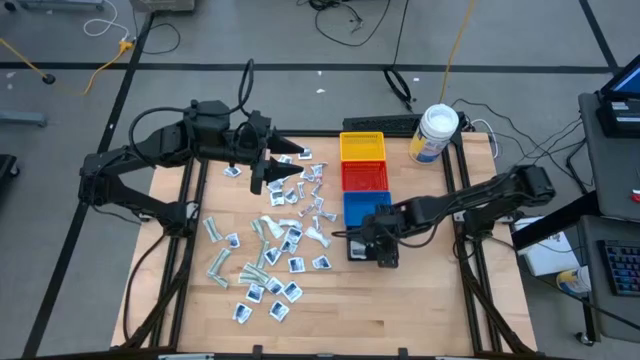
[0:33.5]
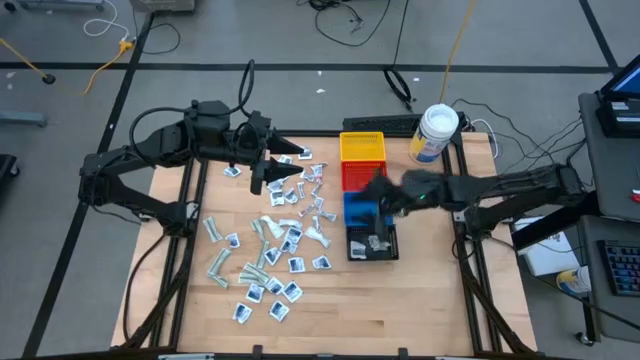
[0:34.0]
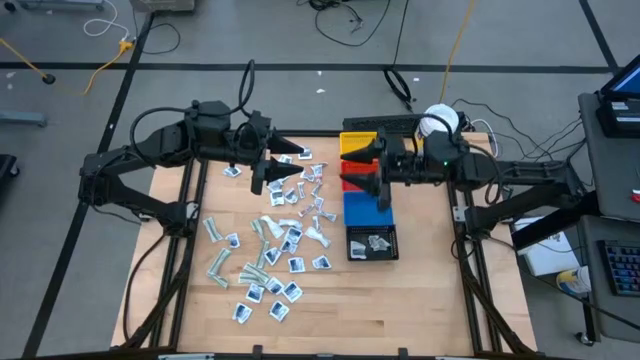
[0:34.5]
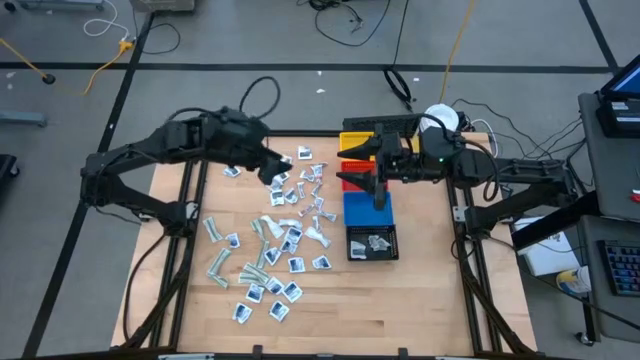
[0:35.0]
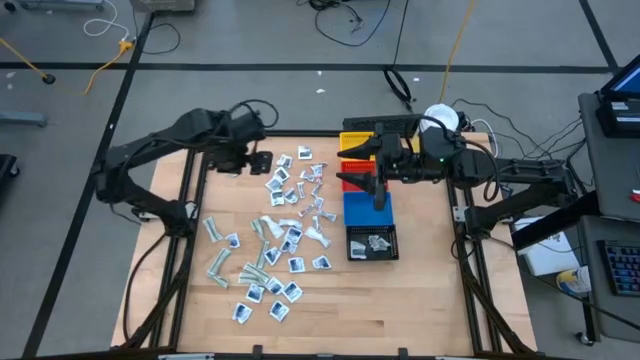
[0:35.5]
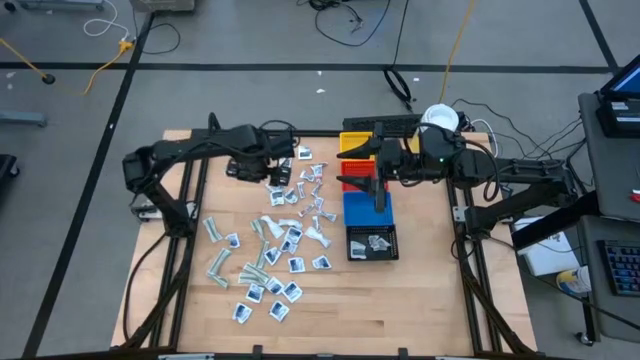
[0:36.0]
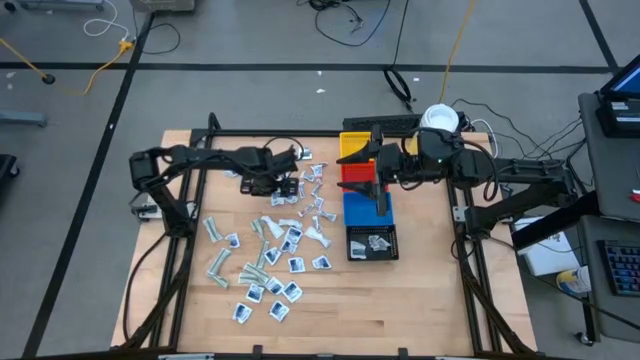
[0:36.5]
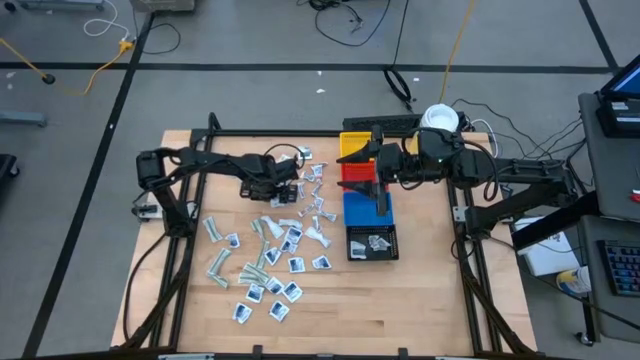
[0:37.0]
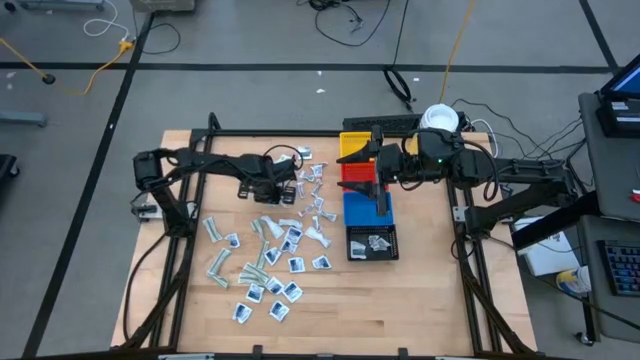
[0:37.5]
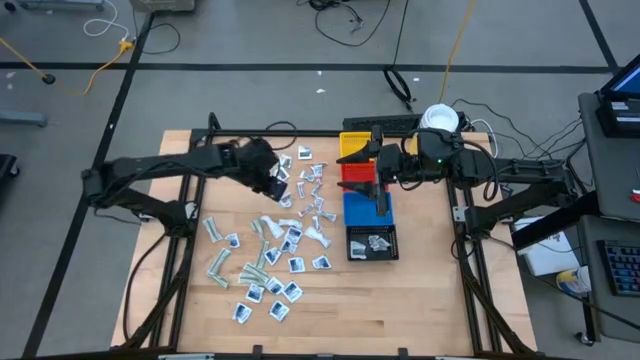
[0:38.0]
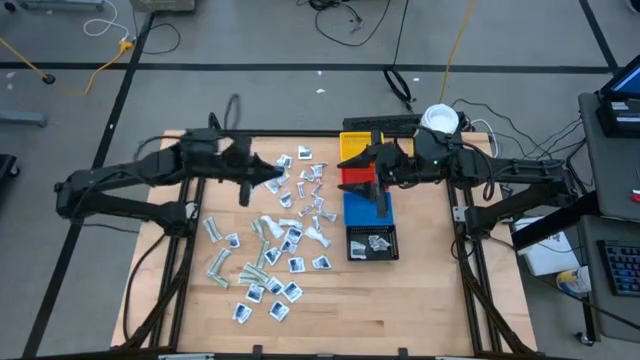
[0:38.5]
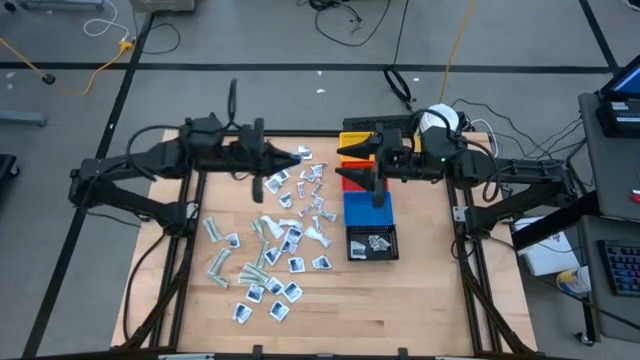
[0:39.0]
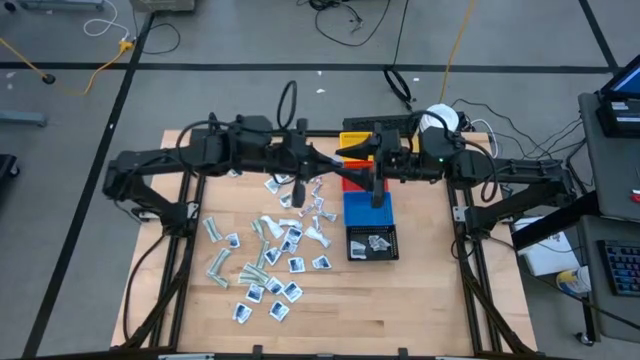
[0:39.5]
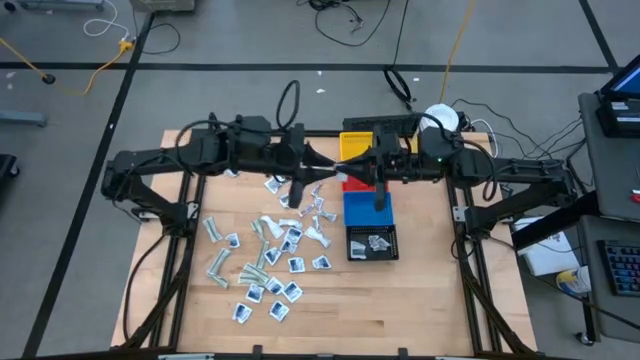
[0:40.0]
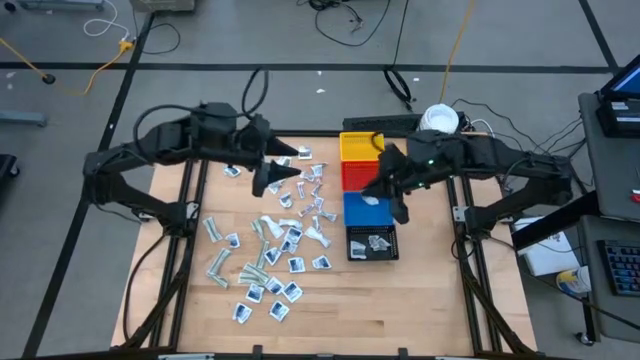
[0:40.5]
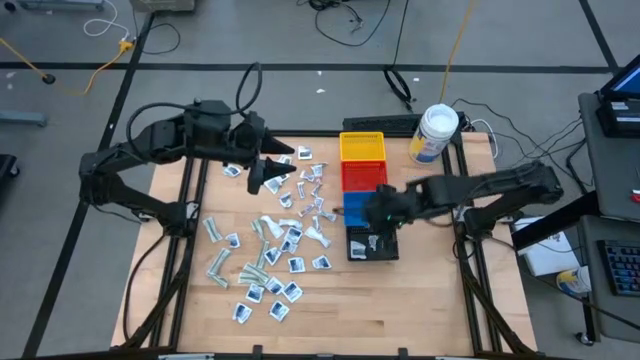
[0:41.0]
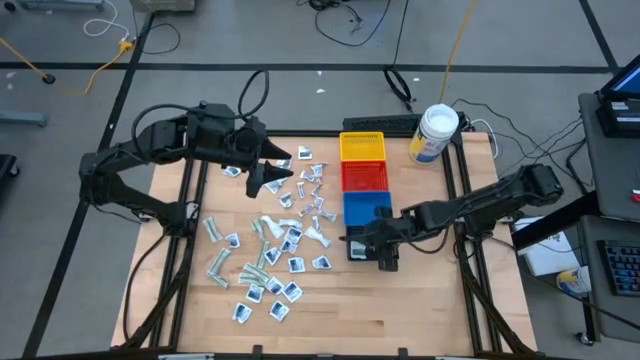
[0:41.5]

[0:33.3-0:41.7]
Task: Pick & Place First Aid Supplies
Put the black towelette pack into the black bin

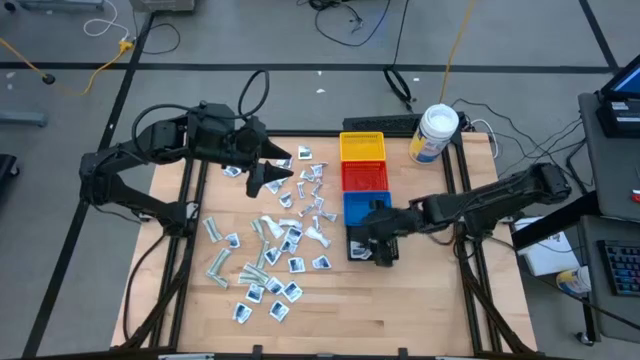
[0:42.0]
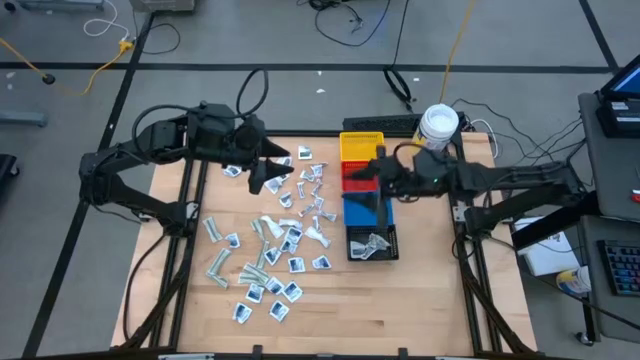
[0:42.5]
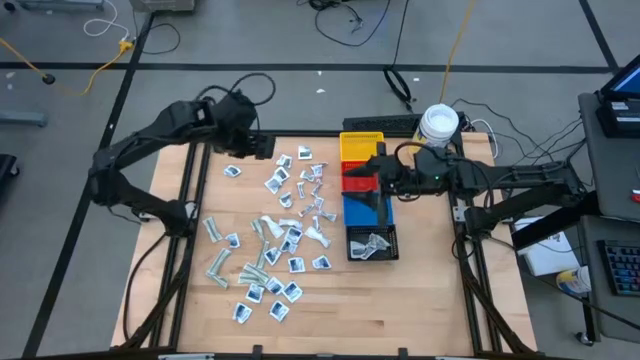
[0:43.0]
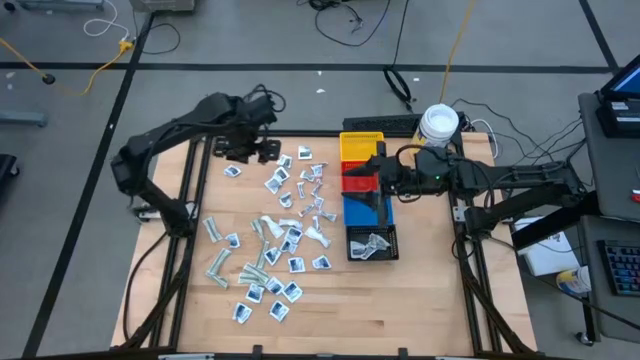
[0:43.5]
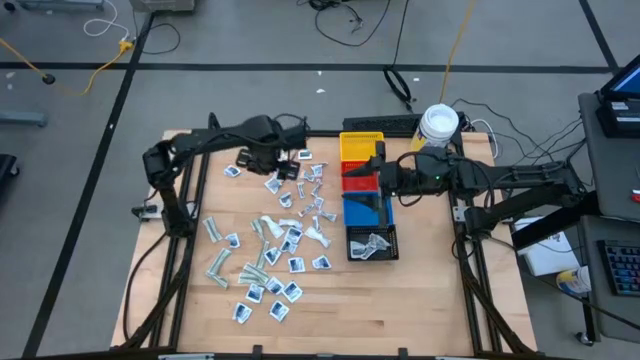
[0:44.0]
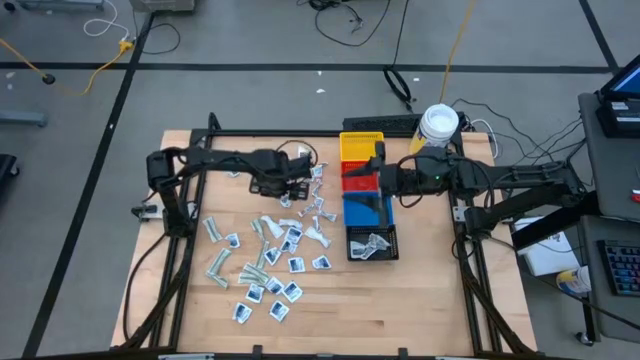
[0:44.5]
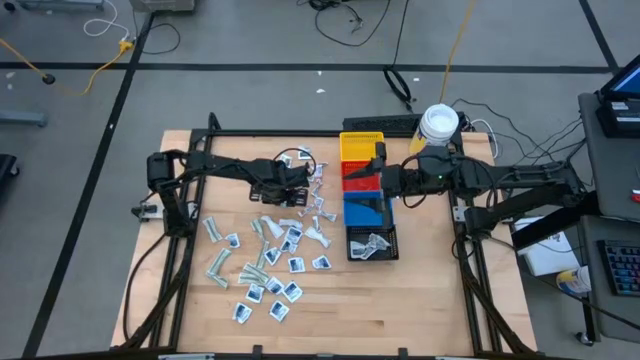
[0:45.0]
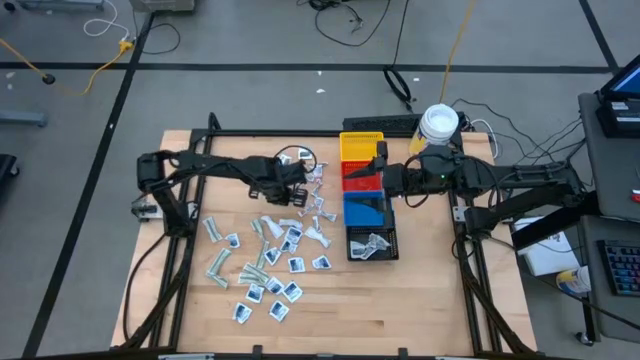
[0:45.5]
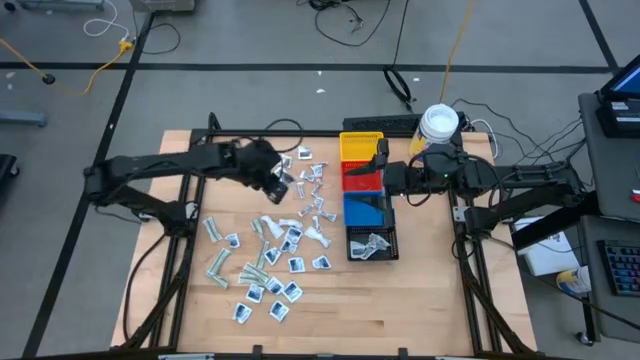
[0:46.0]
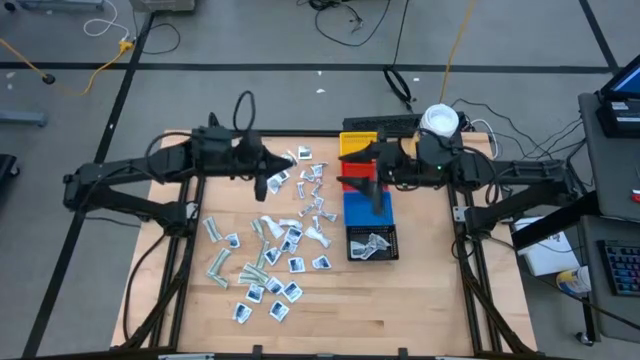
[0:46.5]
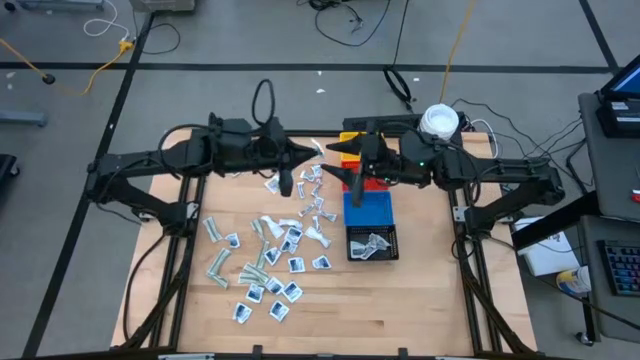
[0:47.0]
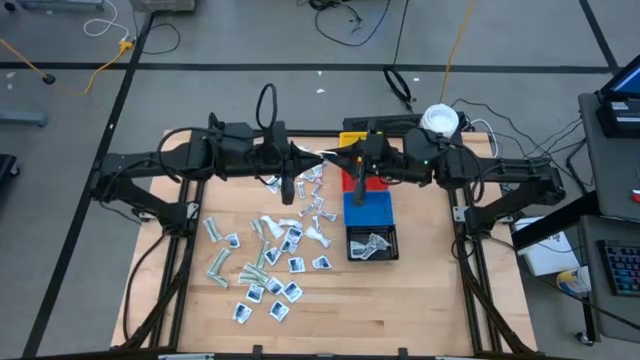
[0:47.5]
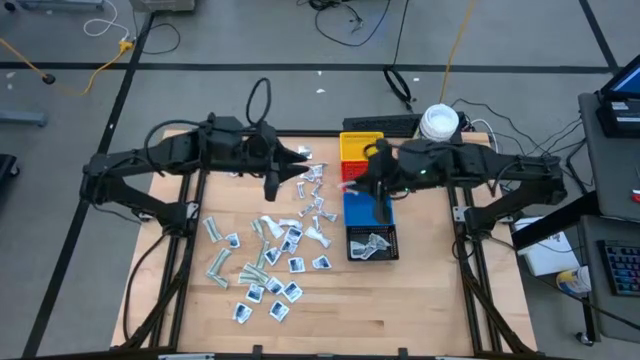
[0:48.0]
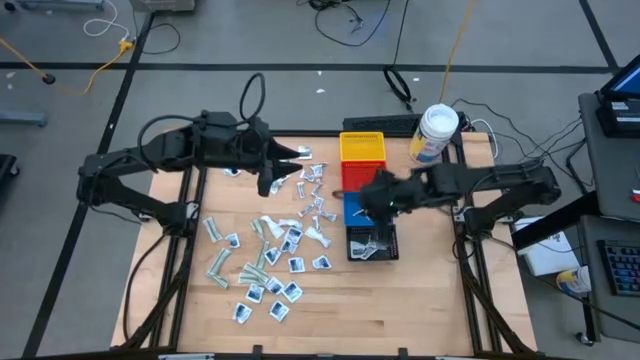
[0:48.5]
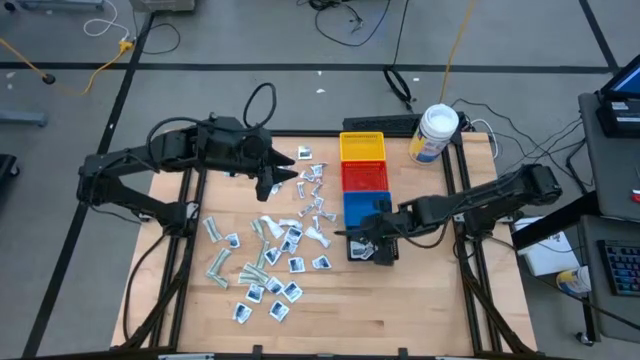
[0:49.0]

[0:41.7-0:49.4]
Put the black towelette pack into the black bin

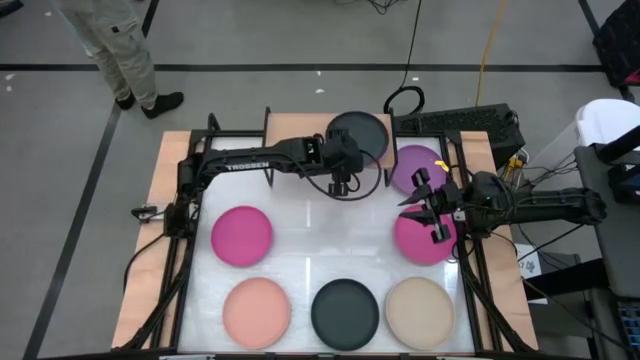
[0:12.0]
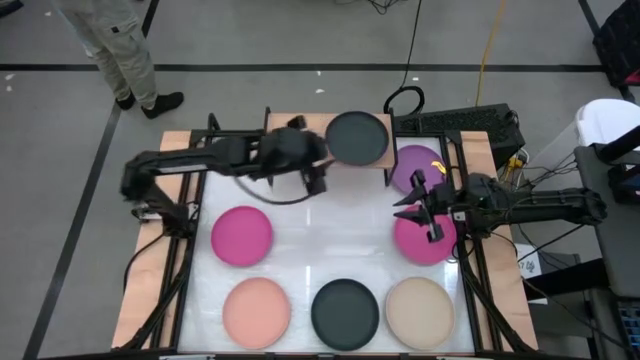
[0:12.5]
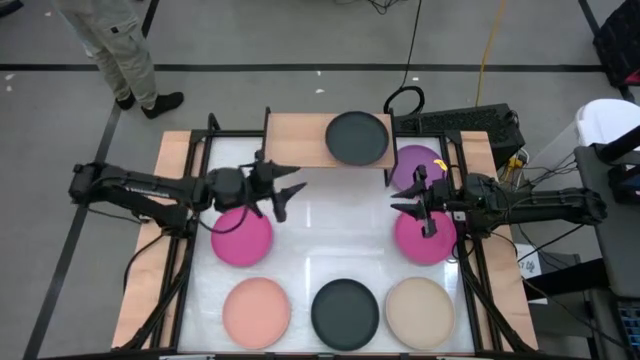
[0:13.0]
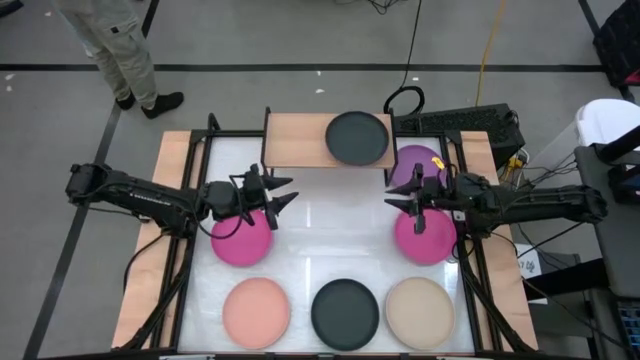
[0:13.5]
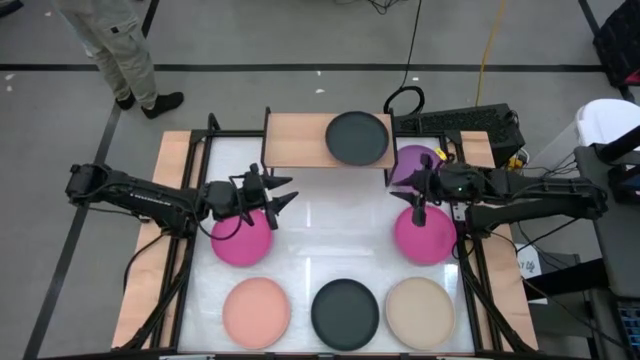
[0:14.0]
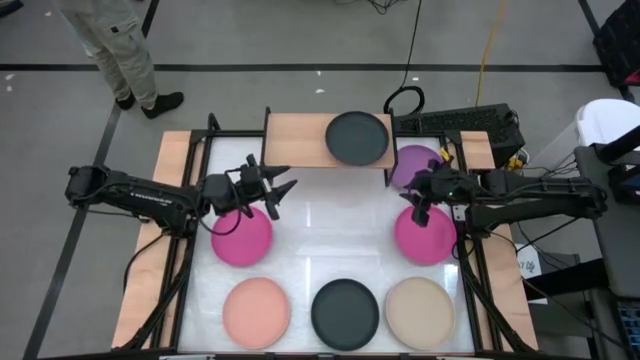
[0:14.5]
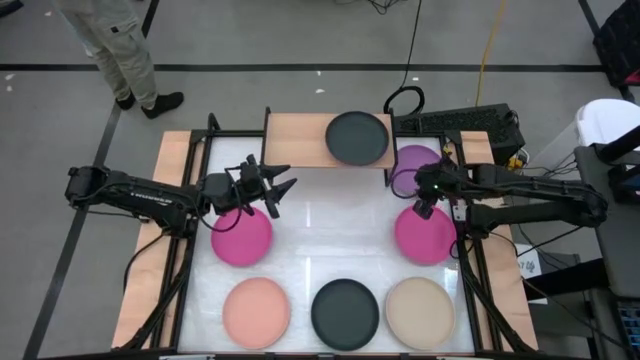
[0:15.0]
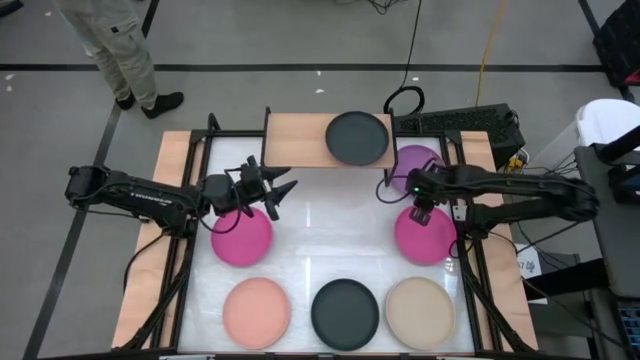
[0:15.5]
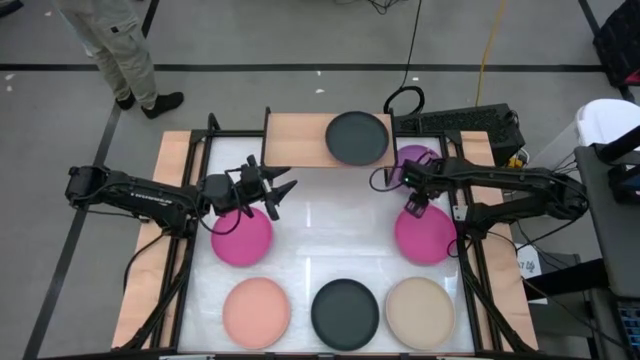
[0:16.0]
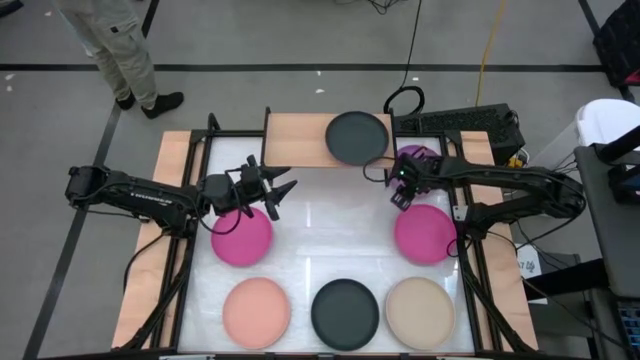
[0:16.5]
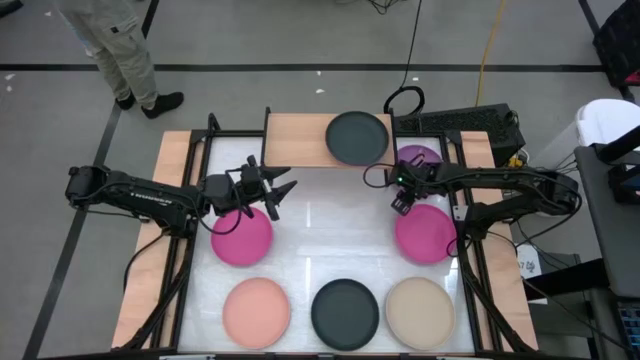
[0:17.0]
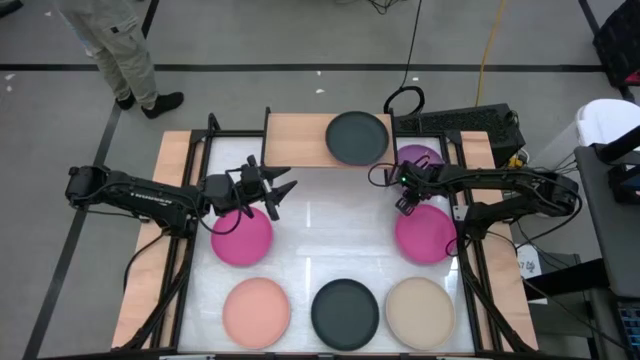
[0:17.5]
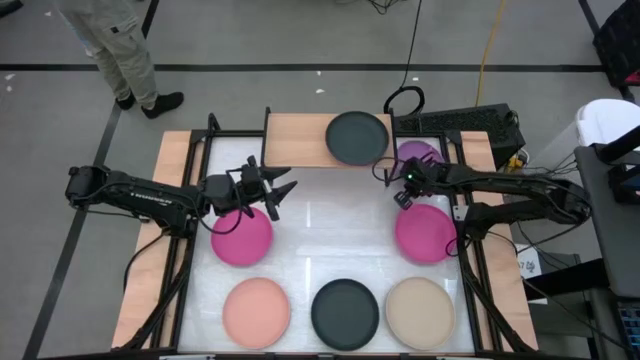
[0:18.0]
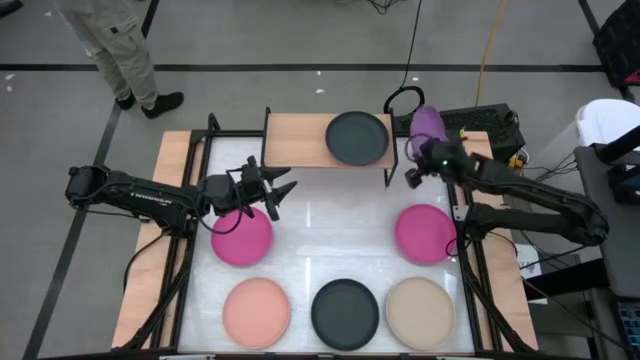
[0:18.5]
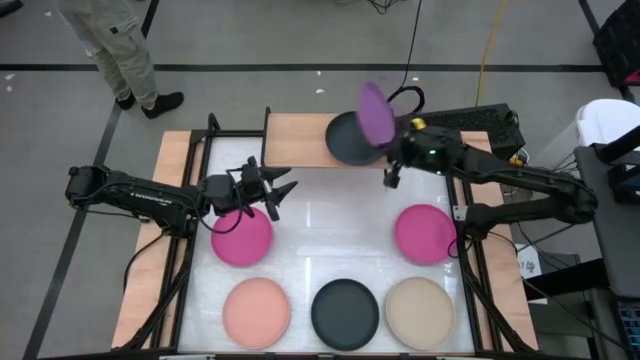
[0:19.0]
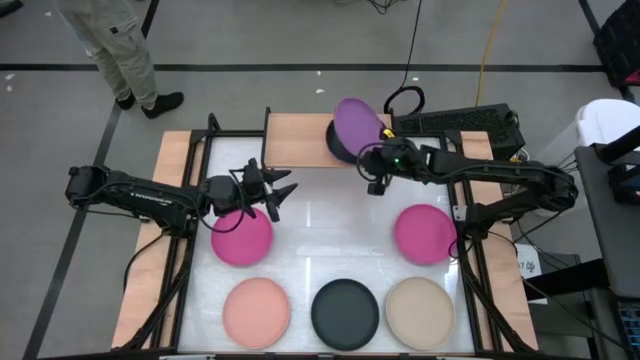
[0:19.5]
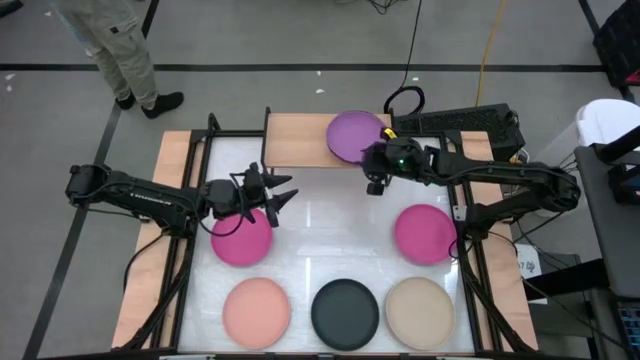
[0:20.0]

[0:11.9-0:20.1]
Task: Place and stack plates onto a shelf
Stack the purple plate on top of the black plate on the shelf
